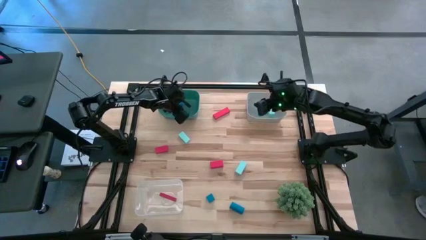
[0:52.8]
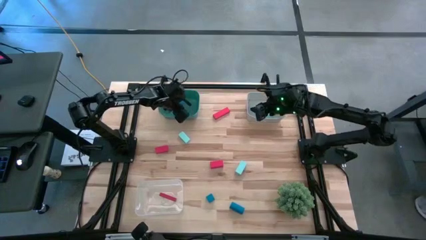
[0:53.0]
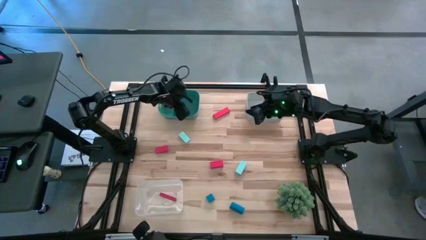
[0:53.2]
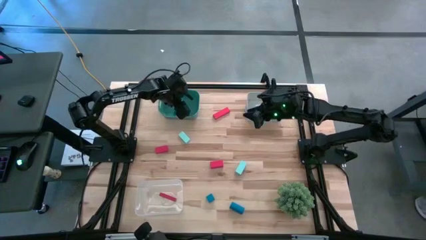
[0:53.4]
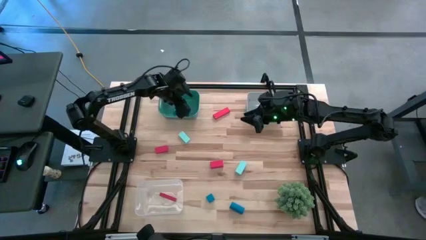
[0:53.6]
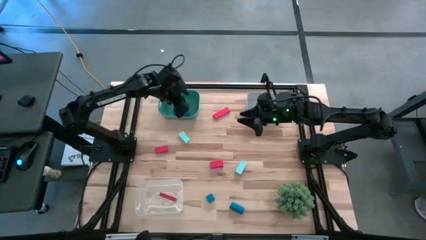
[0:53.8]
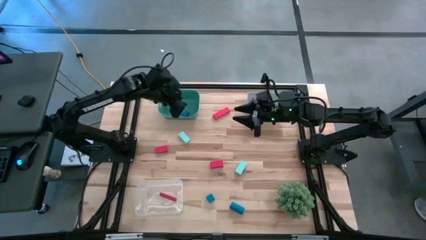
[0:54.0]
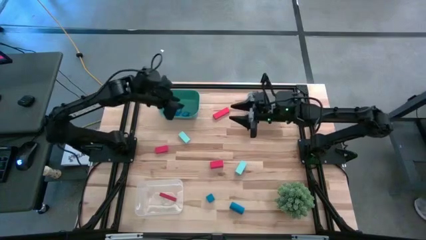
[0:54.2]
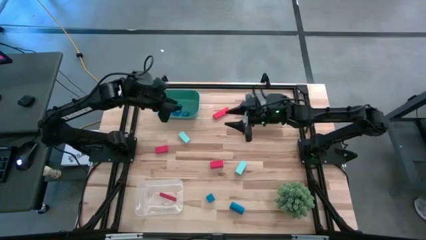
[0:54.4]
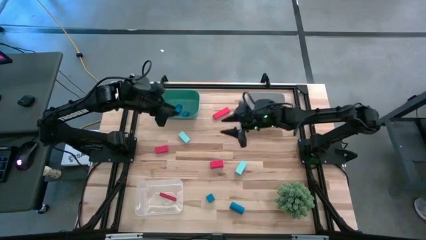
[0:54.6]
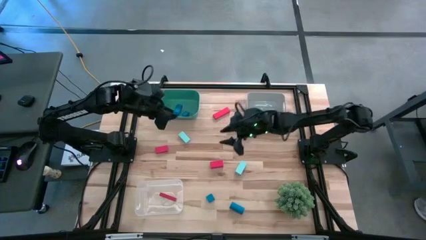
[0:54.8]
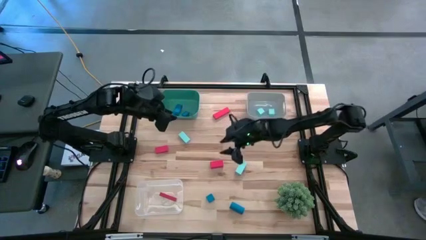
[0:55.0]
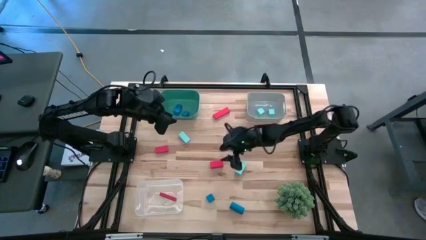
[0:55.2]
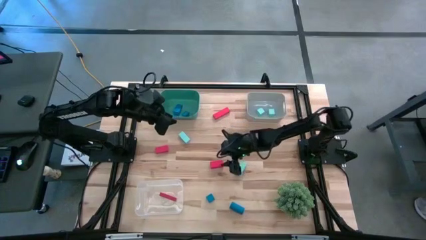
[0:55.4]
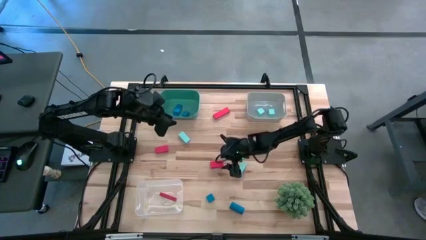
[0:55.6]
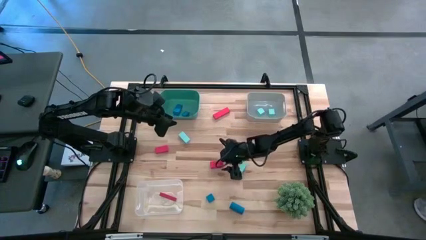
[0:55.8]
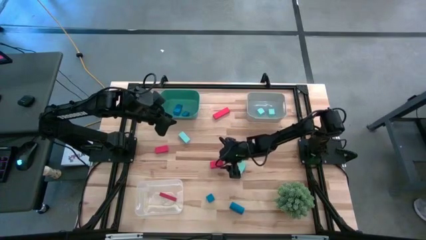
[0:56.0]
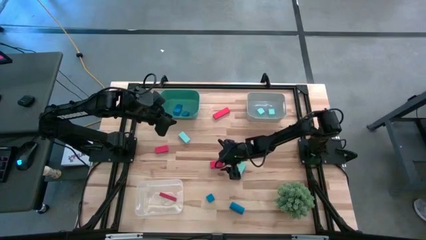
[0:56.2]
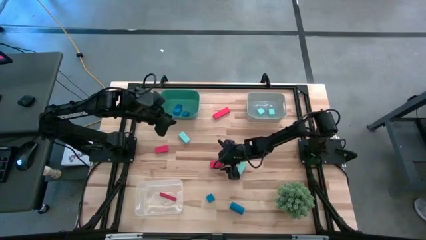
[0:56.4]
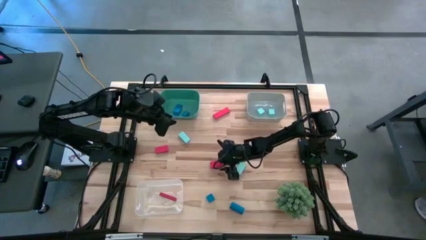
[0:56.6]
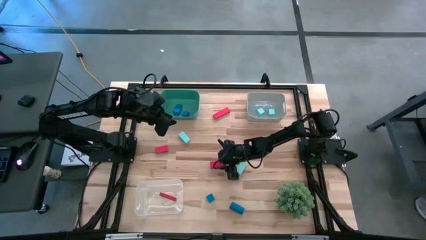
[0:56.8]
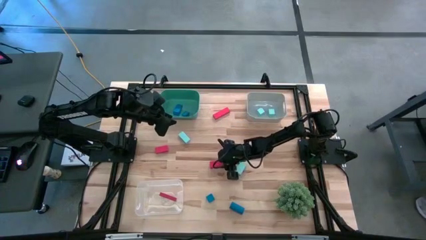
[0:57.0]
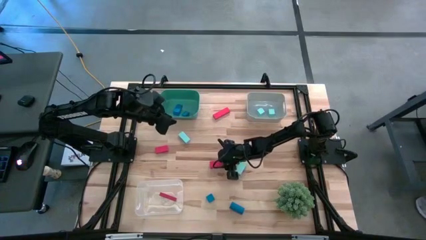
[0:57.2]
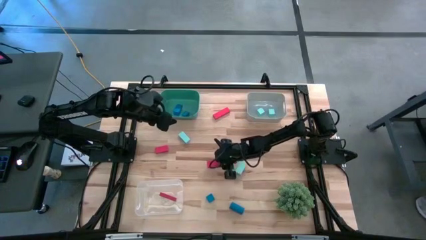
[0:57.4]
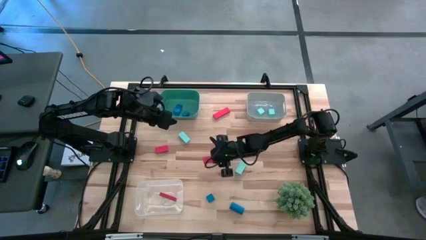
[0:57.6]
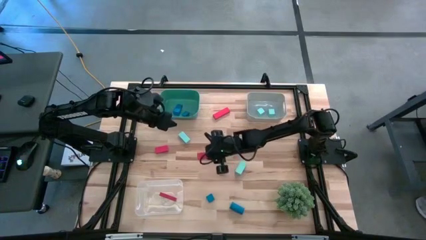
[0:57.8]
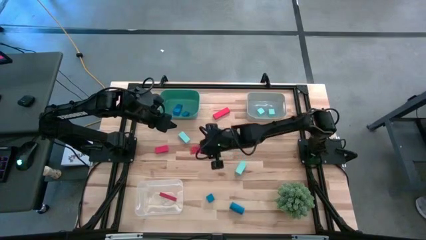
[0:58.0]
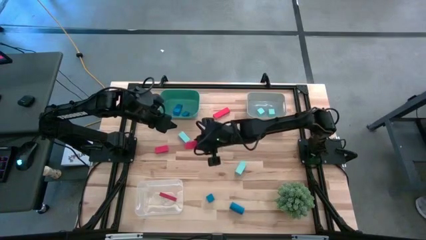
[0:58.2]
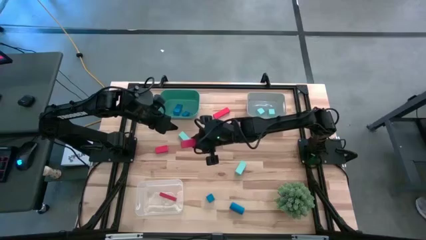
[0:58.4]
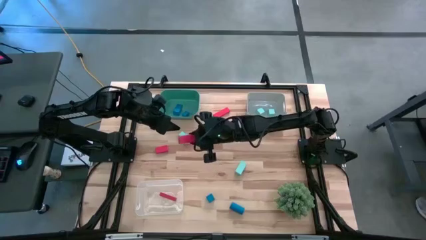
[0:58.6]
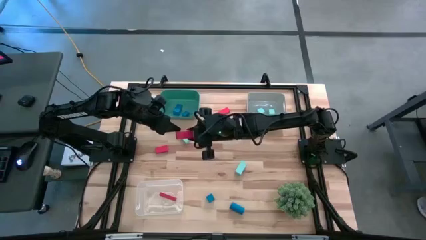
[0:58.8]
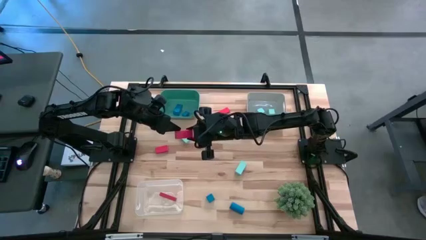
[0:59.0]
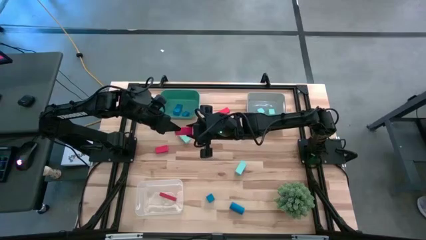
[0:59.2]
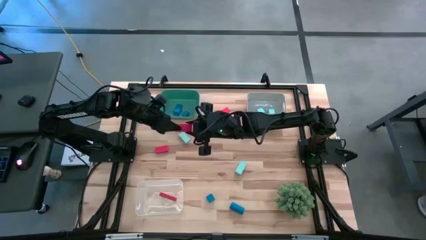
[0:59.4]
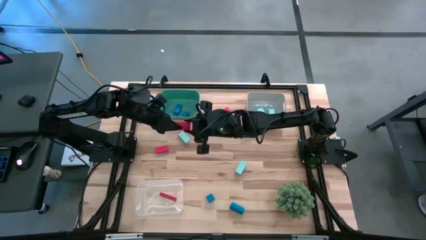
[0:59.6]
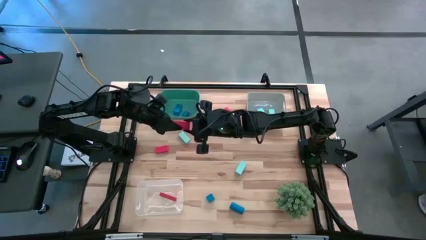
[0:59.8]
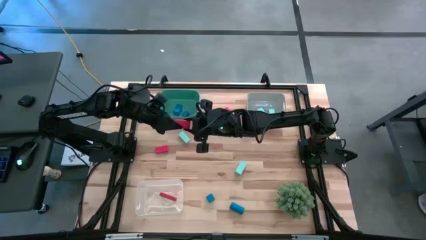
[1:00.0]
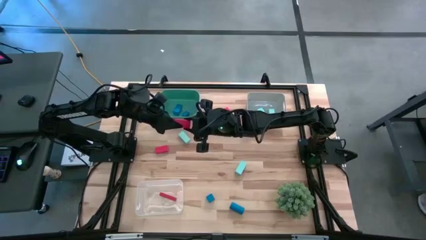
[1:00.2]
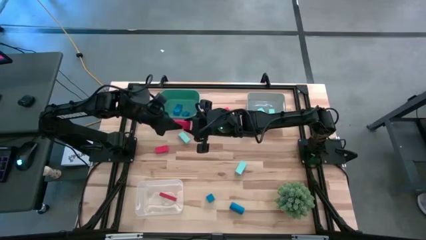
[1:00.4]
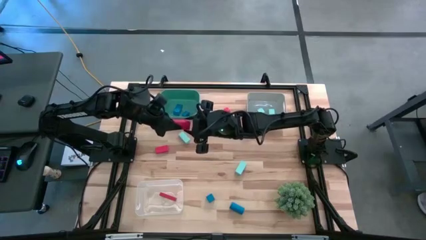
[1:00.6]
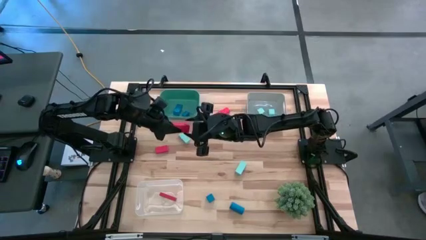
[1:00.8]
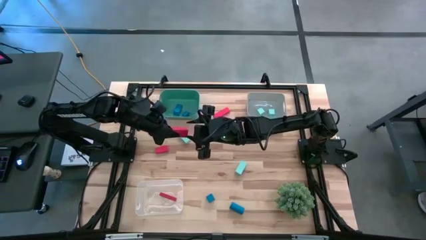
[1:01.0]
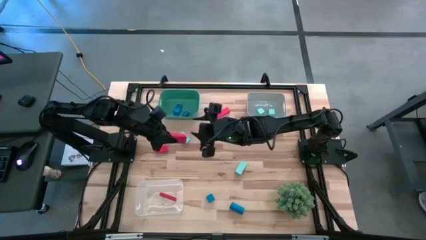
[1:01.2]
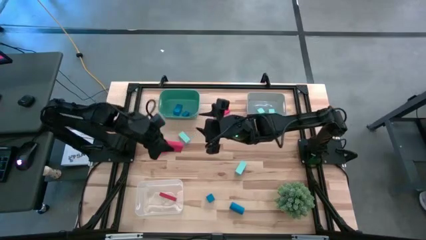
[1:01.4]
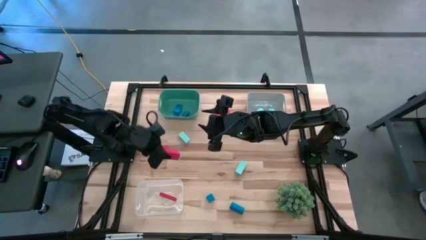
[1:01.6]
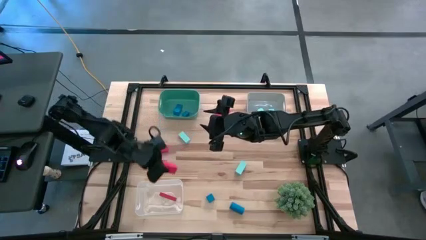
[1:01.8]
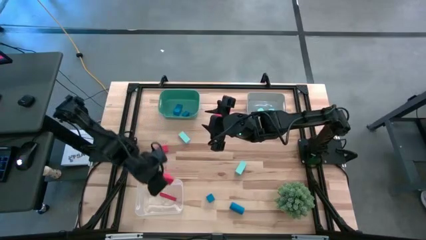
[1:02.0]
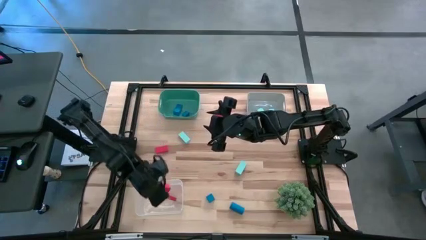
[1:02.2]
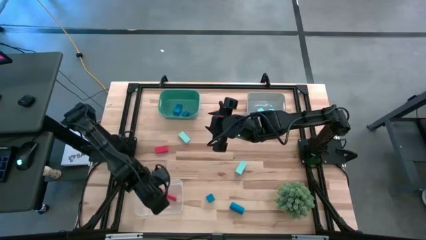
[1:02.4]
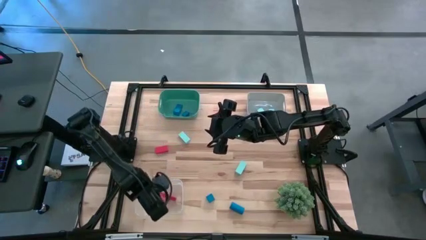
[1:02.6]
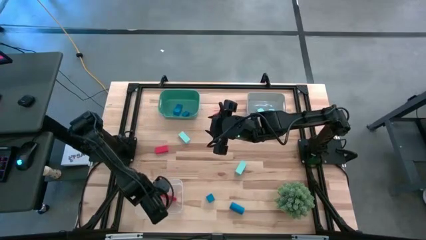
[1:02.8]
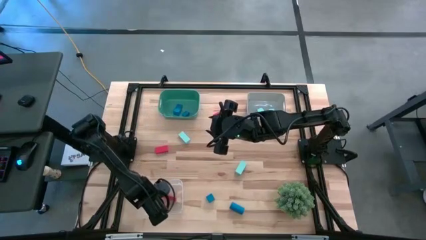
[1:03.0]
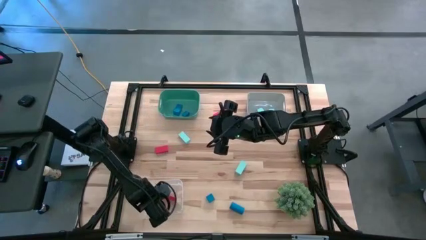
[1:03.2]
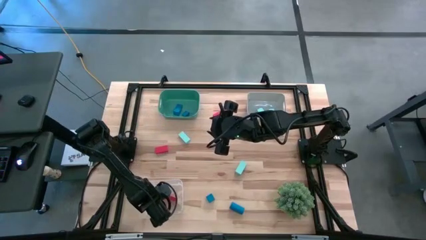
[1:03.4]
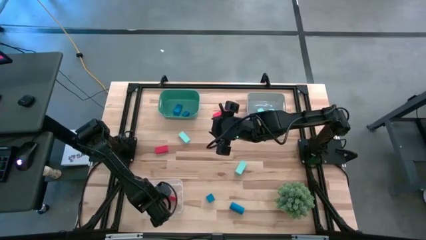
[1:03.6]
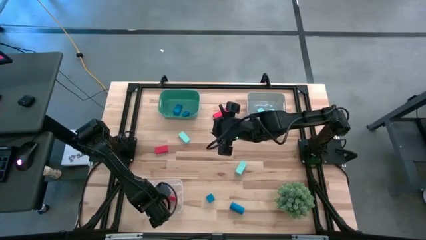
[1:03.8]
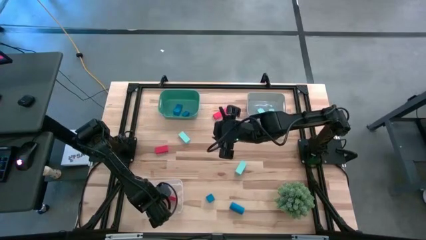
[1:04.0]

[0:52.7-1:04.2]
Task: Sort & place blocks by color
Put the red block into the transparent bin
